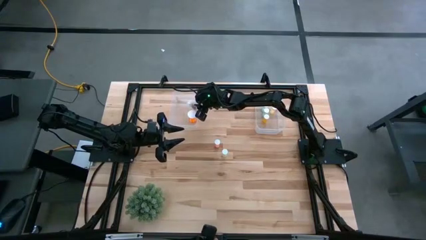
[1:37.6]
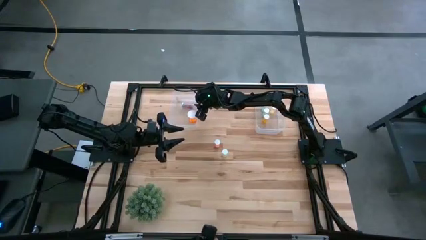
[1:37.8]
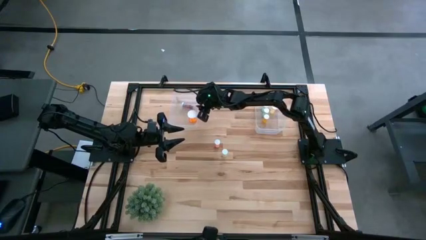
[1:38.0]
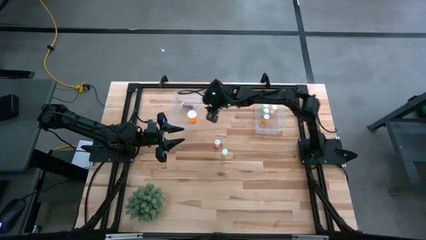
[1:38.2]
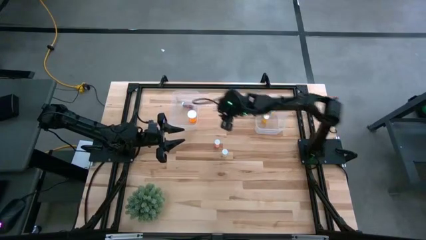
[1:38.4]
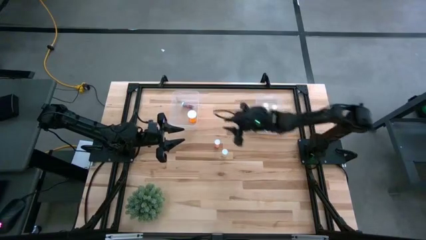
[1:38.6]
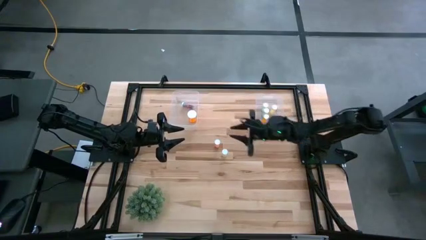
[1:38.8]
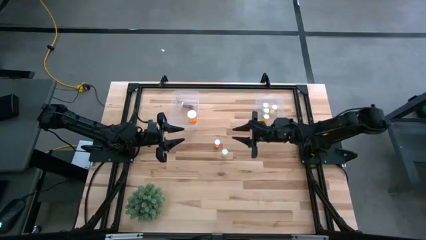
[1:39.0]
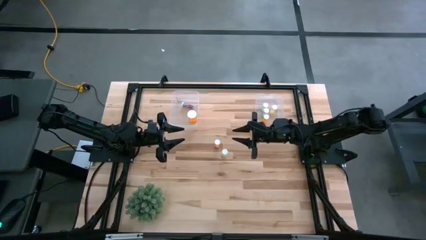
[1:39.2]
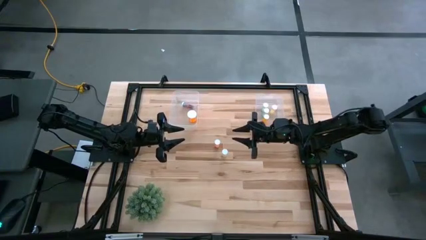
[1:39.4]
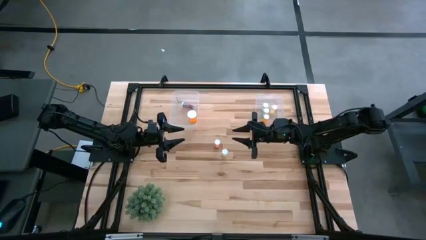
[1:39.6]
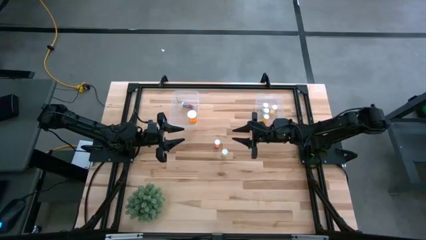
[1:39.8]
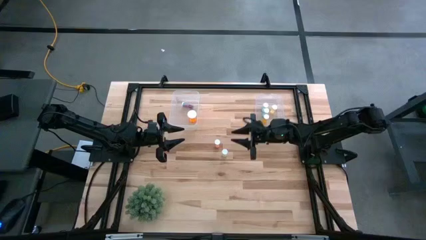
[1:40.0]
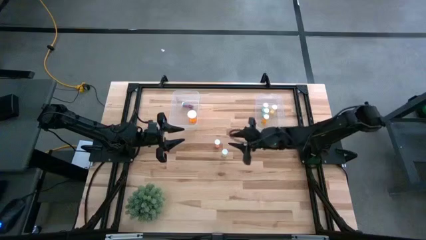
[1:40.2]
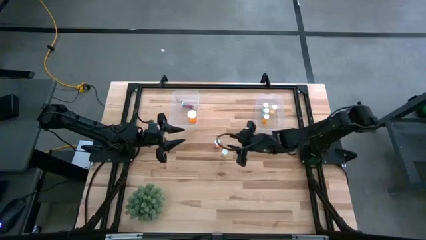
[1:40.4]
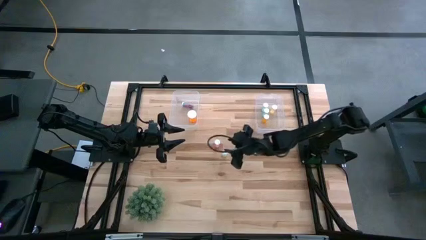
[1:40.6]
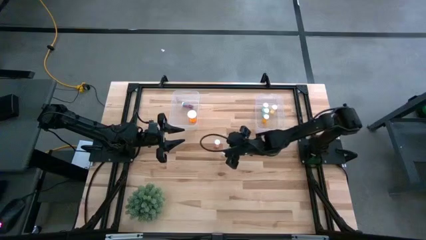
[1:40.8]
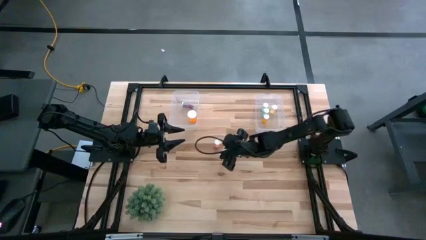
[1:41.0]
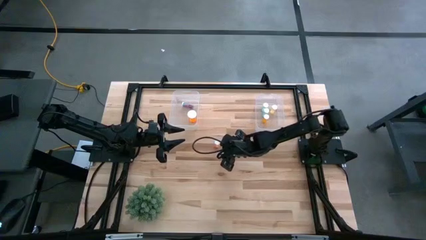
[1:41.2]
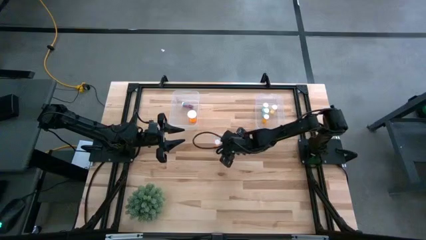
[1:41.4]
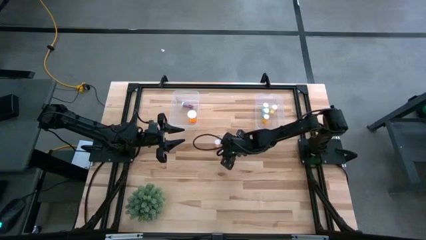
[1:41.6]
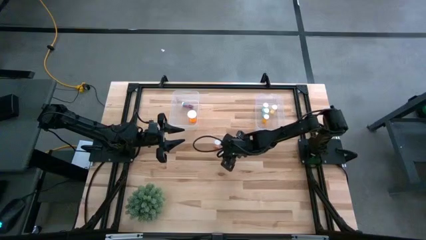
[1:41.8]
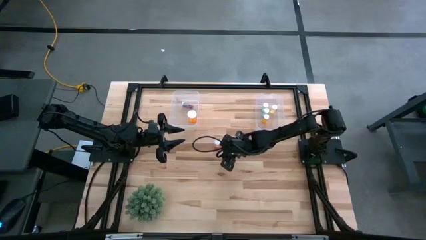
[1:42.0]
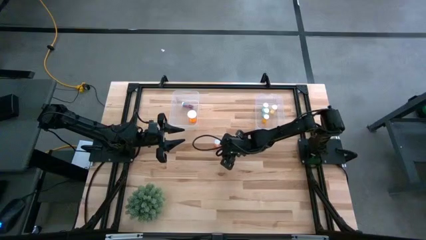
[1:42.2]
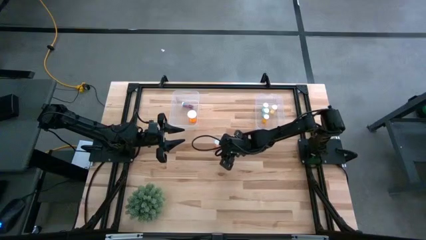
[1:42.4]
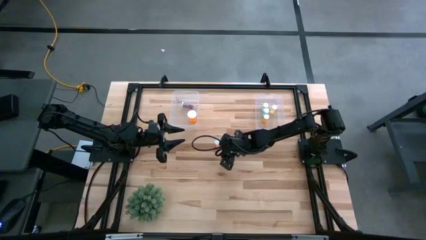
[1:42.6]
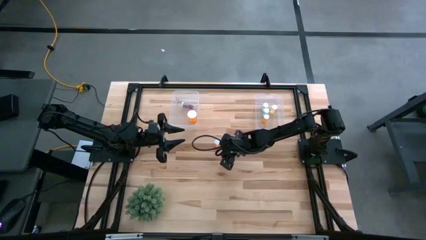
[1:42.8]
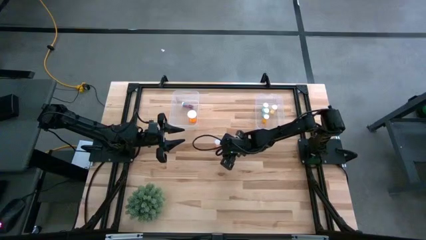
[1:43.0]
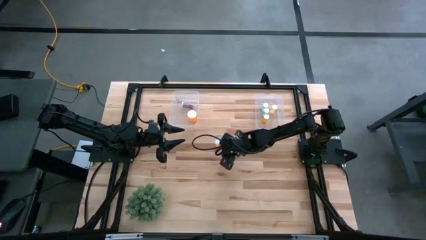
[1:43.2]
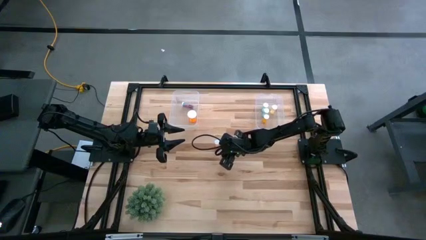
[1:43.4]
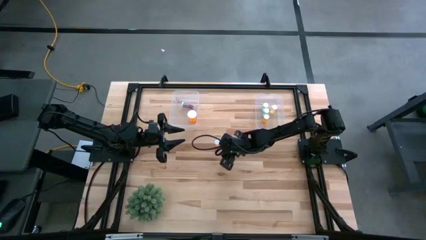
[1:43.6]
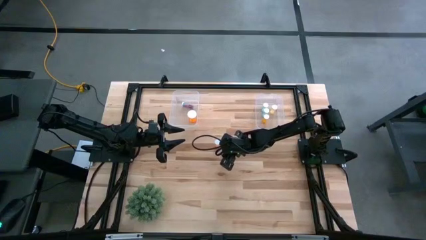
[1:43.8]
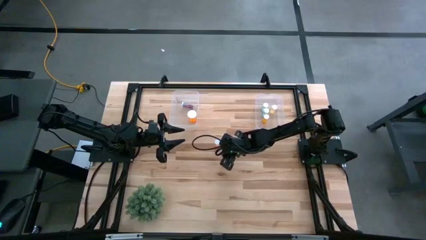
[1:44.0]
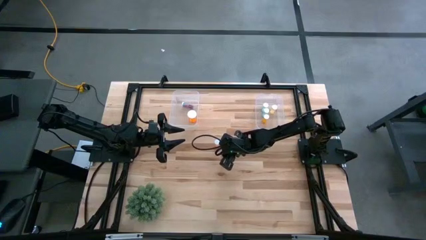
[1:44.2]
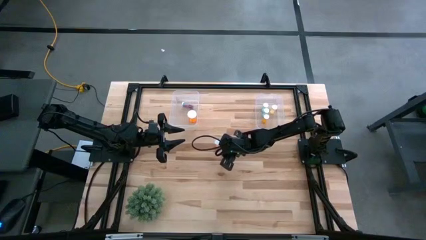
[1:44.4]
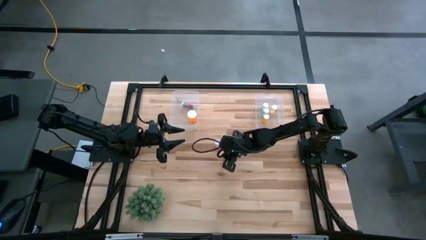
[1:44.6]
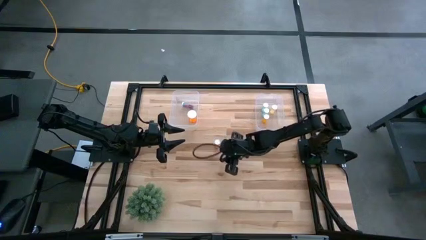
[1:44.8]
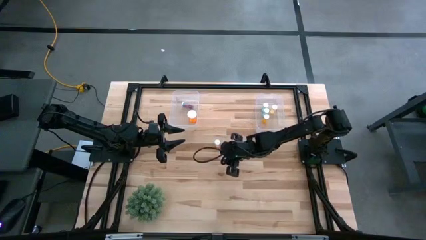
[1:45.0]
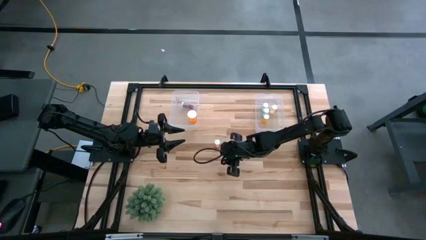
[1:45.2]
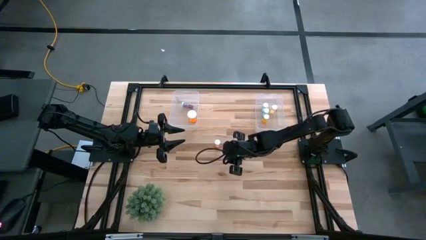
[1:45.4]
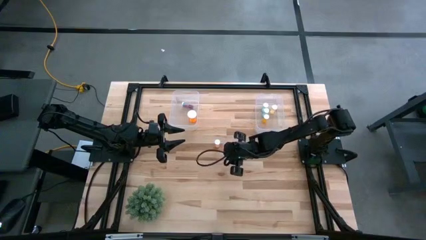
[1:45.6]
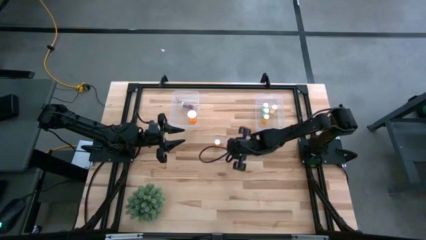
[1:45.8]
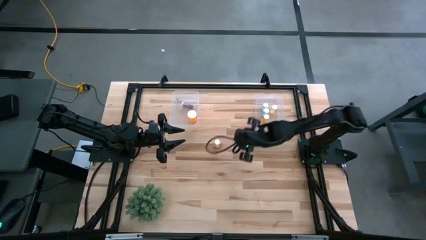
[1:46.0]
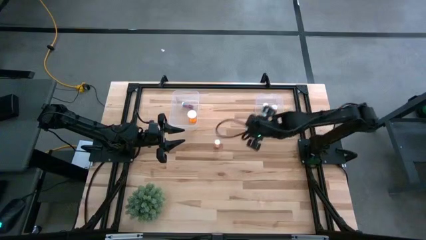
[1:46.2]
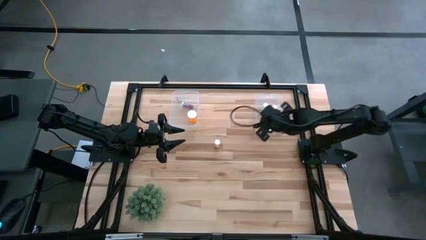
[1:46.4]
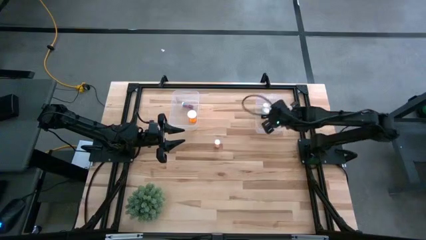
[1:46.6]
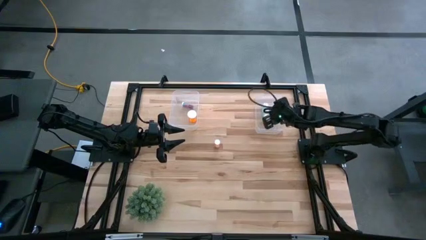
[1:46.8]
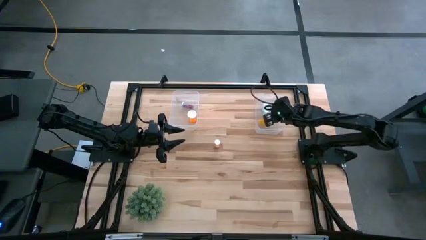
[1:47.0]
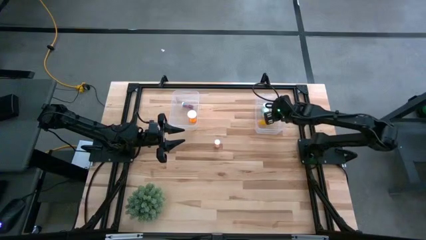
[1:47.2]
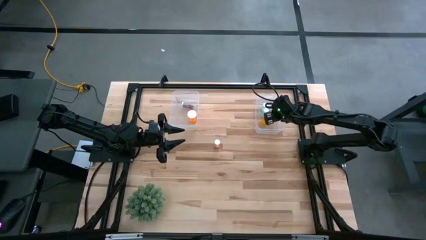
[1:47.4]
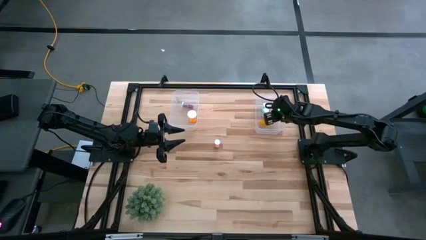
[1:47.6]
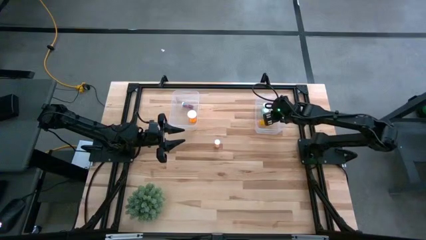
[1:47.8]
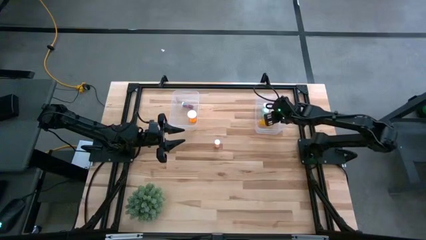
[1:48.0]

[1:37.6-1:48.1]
Task: Pick and place medicine bottles into bin by pill shape (circle, oval)
Put the yellow tablet bottle into the right transparent bin

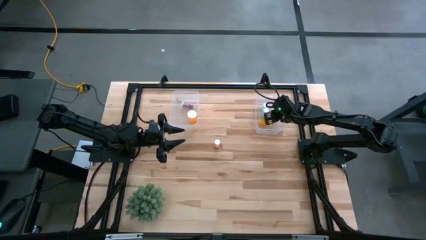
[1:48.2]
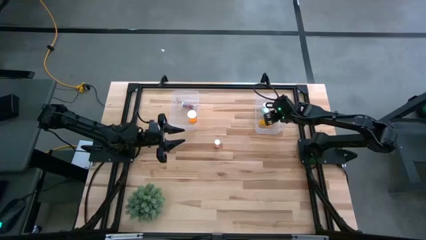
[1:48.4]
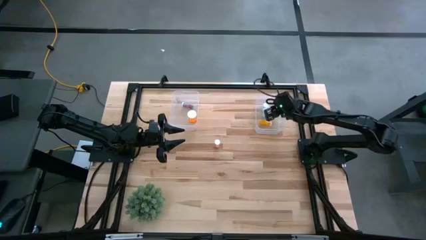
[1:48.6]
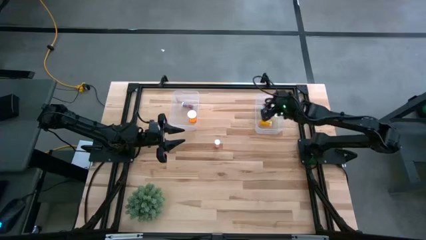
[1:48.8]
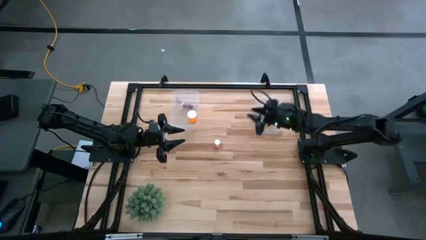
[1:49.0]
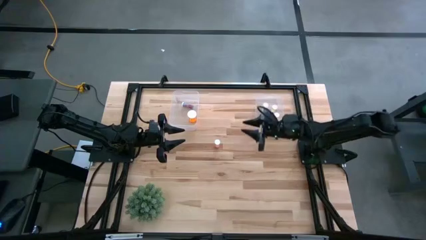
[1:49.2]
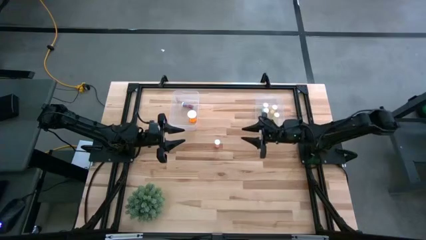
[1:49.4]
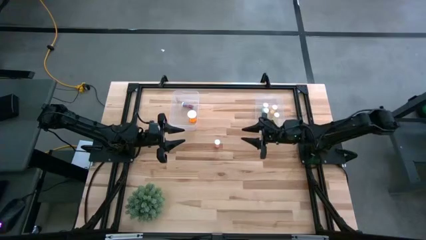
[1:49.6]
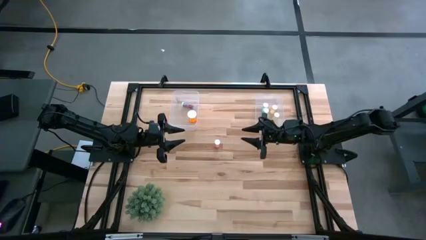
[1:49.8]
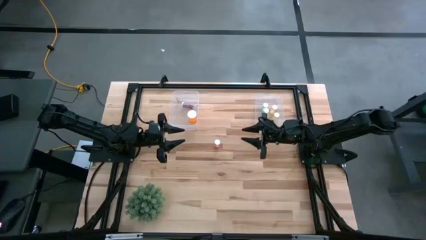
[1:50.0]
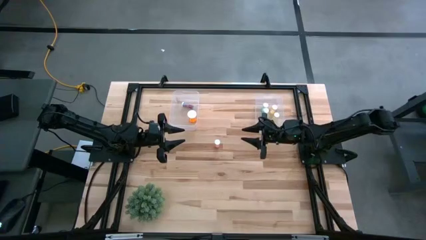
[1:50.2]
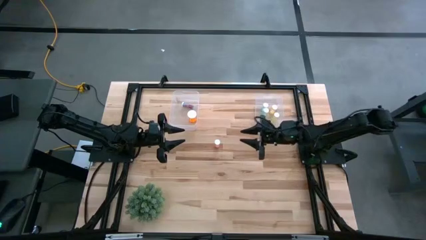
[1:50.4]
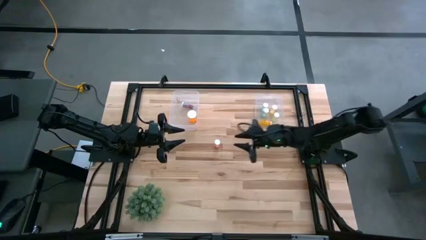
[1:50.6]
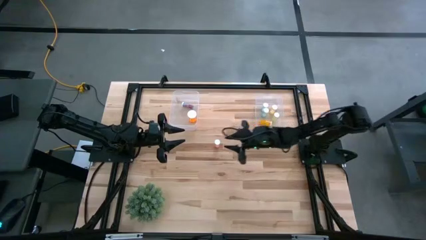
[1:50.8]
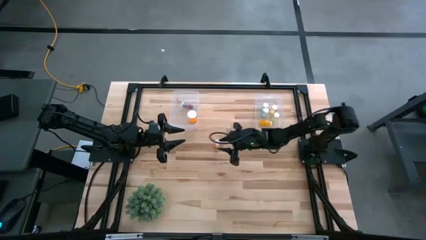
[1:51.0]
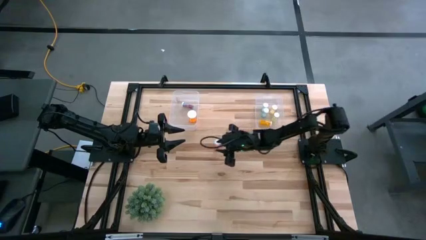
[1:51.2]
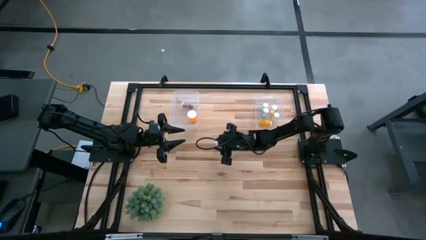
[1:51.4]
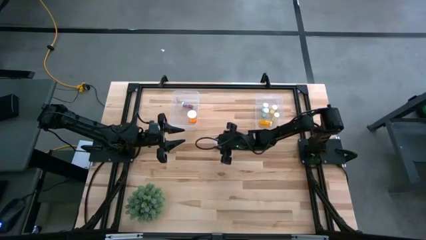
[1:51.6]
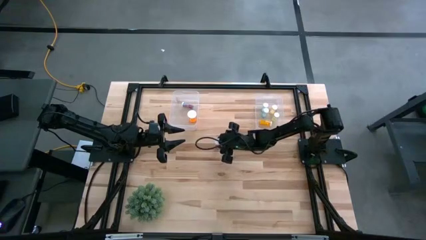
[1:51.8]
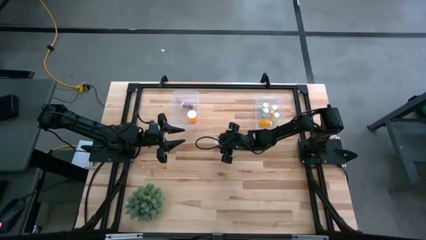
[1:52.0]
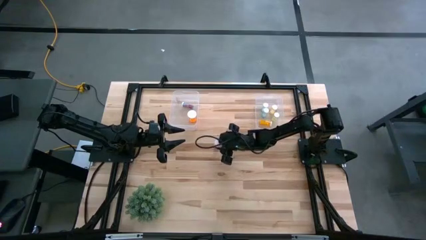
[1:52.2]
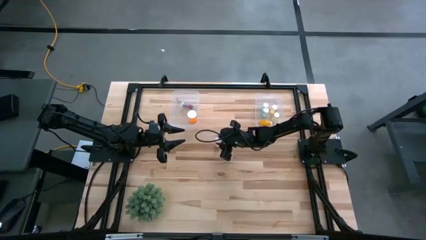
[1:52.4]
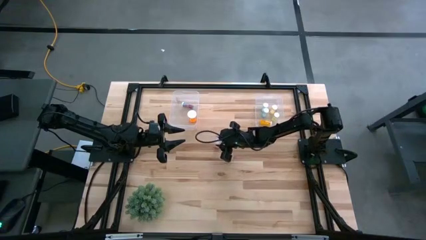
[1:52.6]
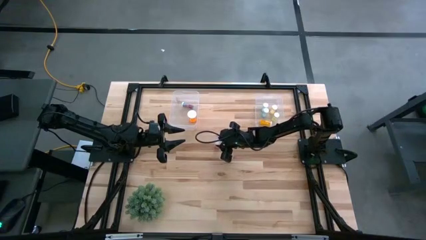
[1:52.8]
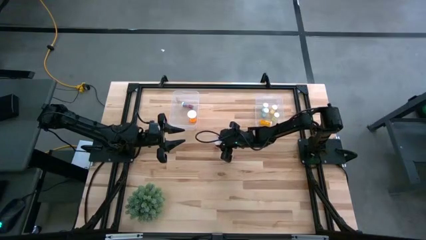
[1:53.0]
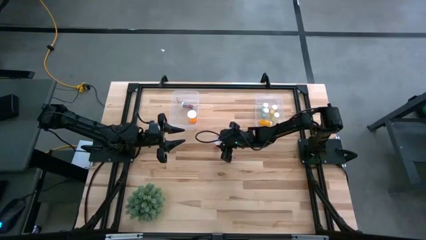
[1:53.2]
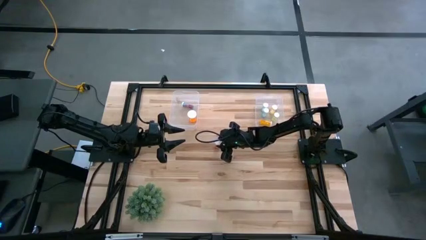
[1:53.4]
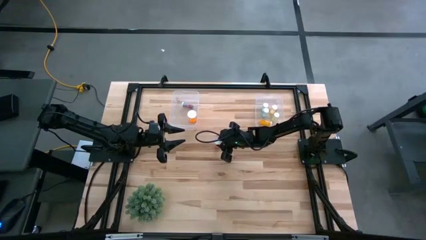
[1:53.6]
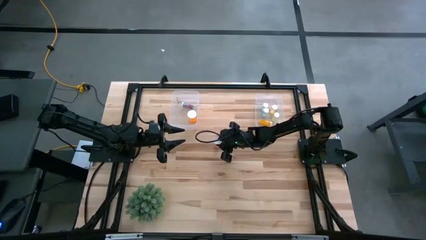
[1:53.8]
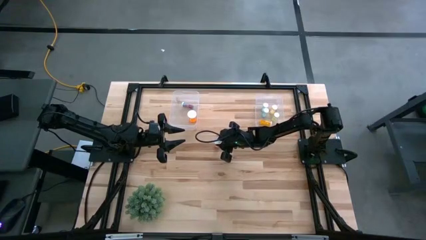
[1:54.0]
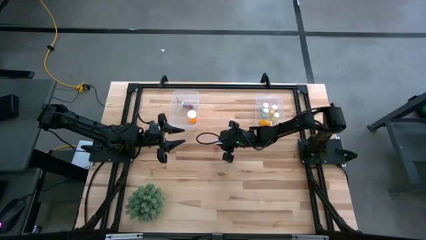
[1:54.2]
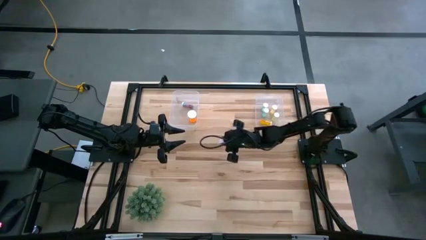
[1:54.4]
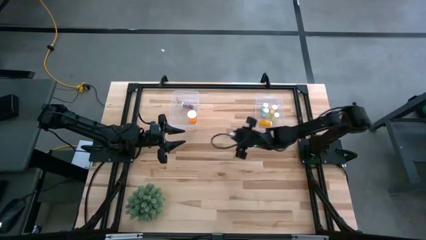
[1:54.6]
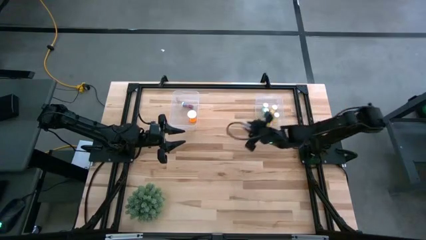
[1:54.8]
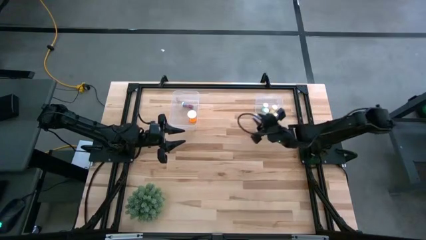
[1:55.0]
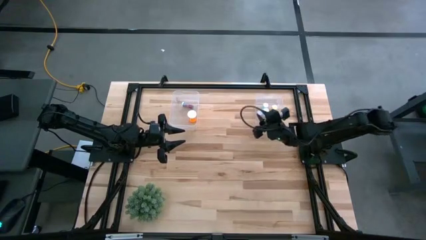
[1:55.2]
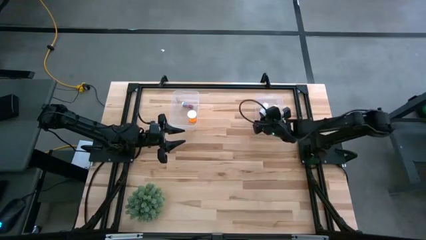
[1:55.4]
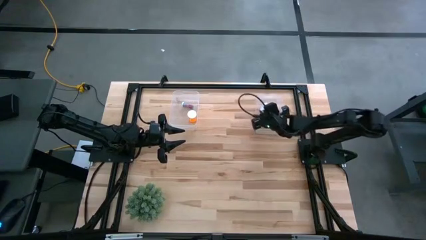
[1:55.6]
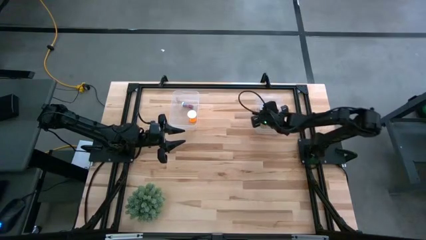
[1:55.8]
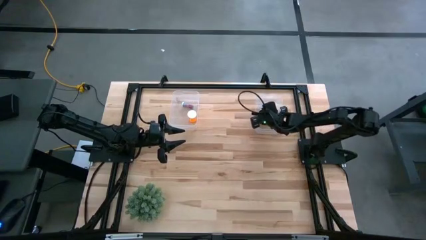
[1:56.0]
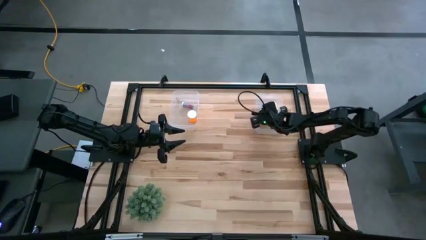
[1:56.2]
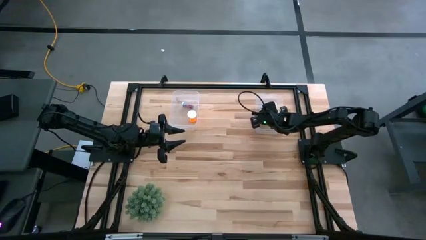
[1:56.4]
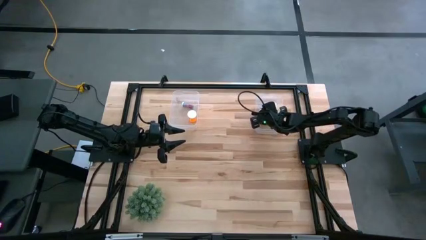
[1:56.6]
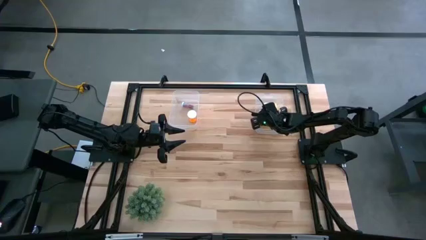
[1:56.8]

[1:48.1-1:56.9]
Put the red tablet bottle into the right transparent bin
